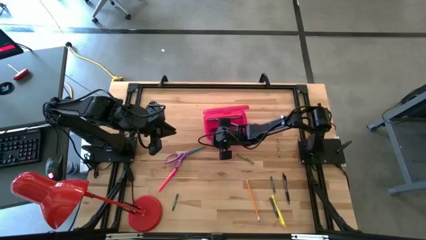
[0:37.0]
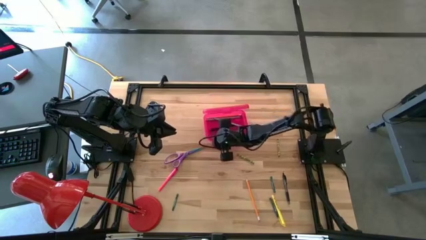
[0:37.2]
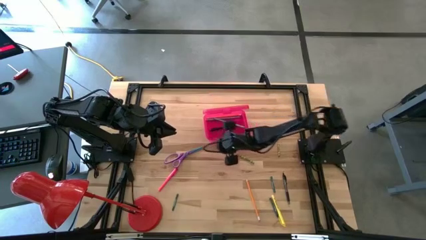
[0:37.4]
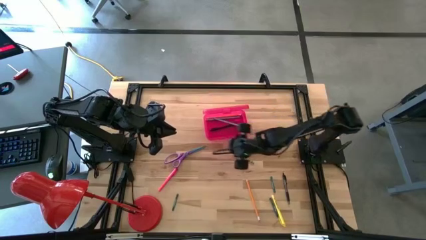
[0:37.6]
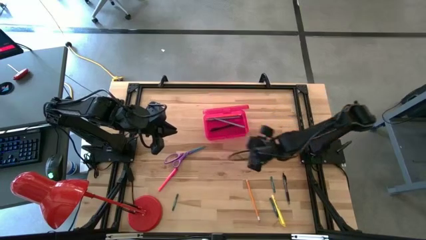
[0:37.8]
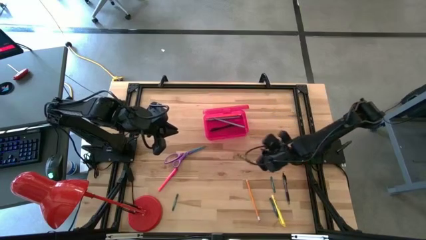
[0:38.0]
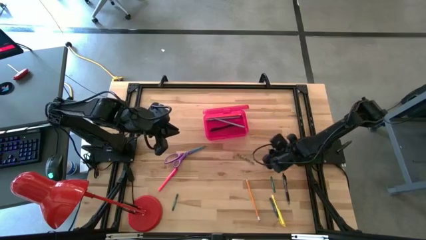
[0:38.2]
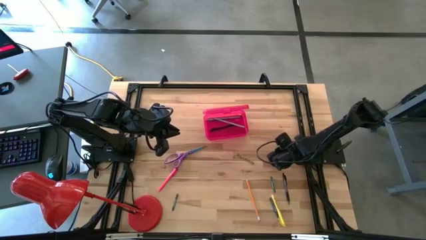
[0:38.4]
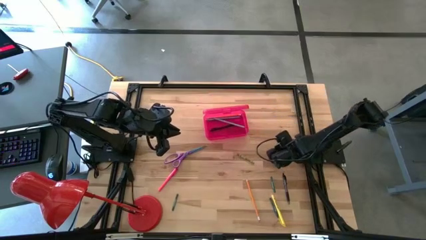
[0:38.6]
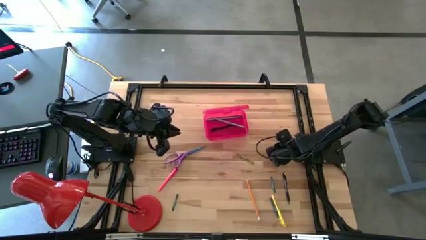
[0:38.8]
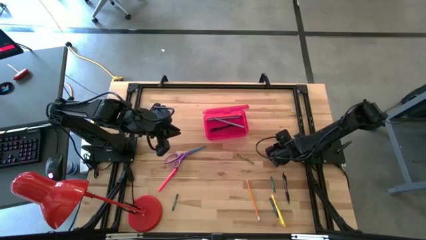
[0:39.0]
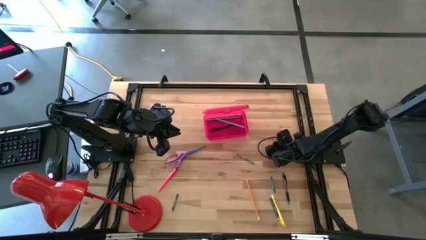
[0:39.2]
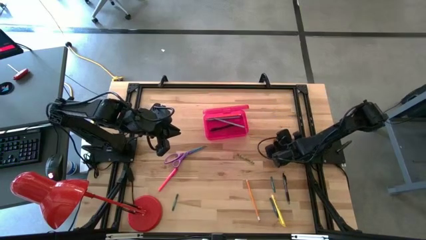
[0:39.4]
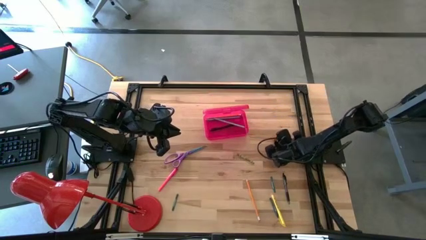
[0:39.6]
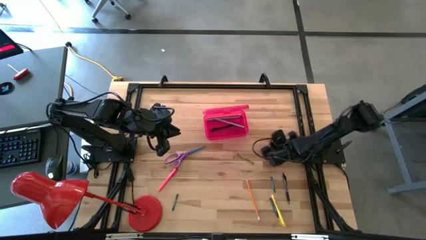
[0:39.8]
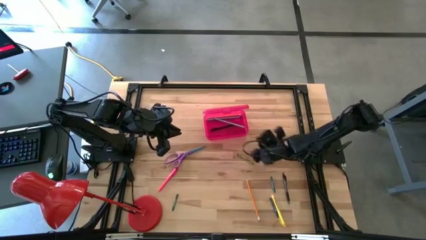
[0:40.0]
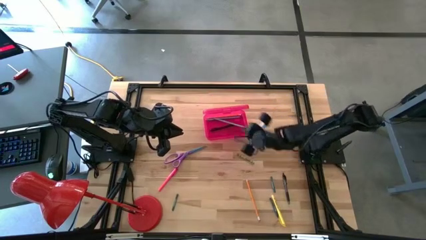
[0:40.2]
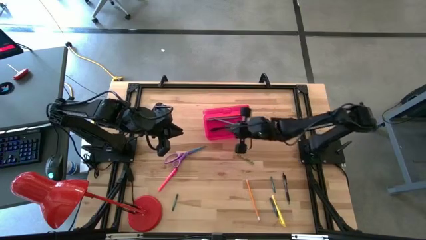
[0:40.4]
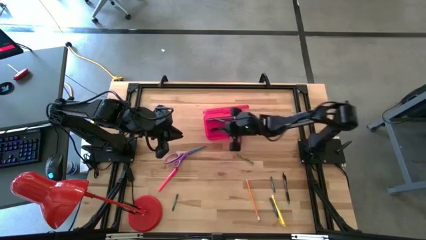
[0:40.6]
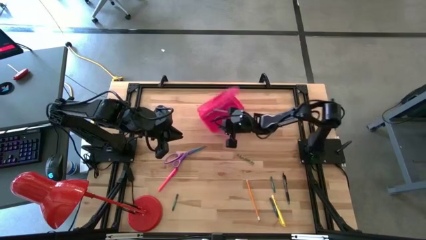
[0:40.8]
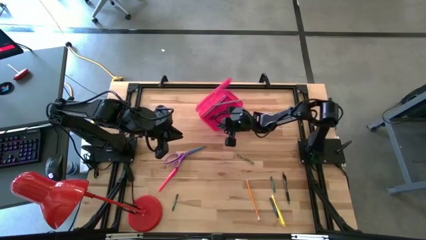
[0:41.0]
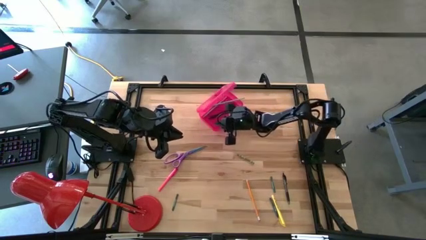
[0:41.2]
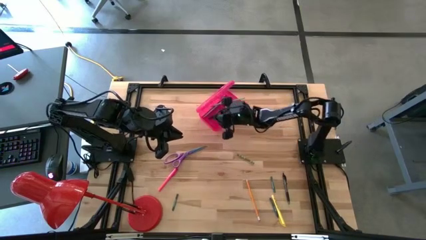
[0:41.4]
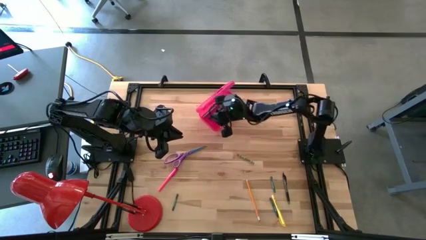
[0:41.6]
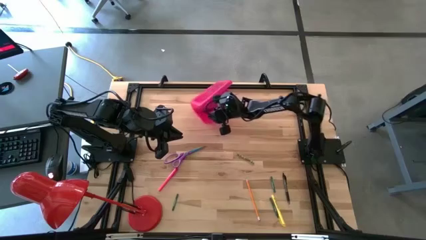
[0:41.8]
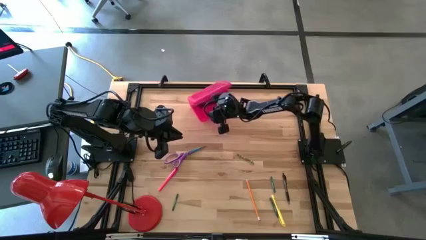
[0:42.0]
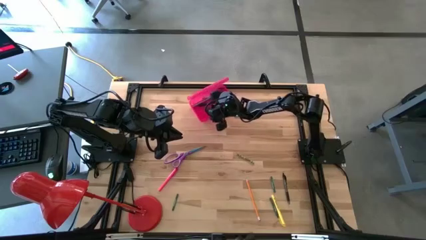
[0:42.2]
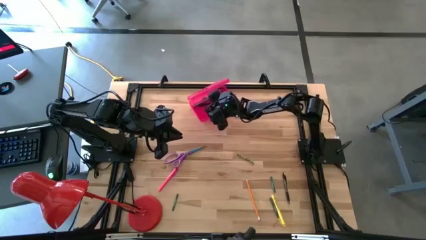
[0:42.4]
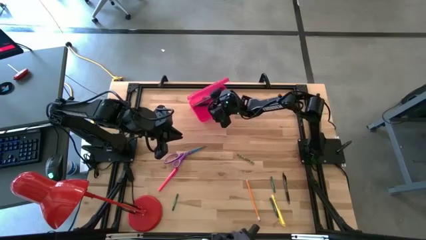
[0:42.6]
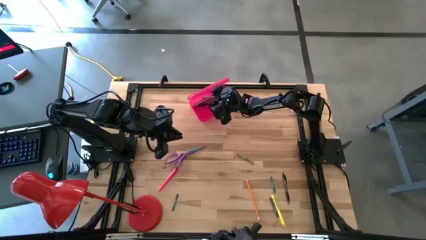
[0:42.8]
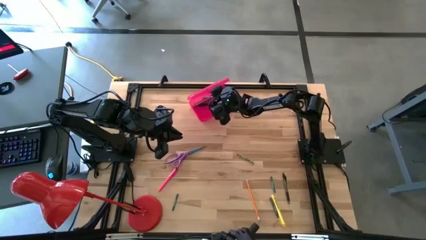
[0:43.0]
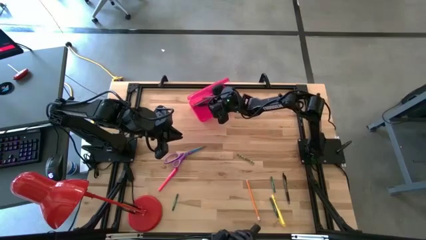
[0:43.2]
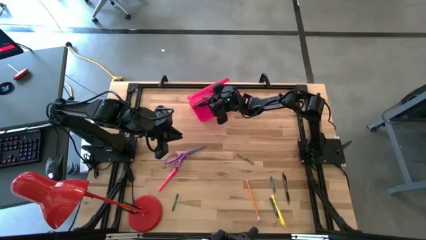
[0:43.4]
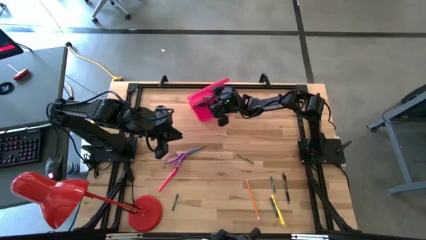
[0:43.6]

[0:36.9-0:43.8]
Task: Pick & place school supplies into a supply box
Put the right light green crayon into the pink supply box

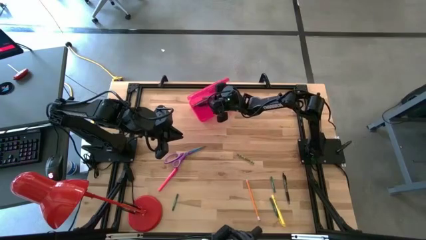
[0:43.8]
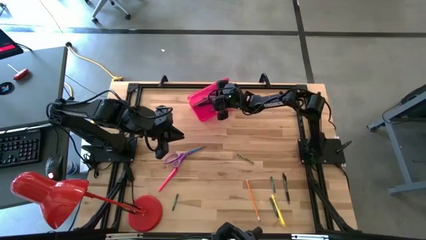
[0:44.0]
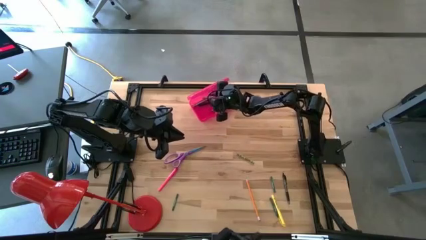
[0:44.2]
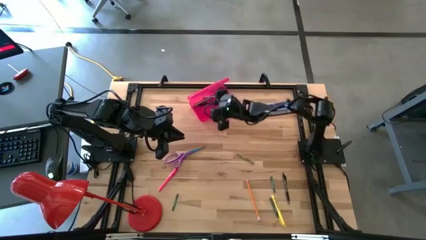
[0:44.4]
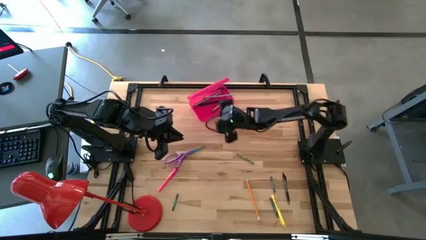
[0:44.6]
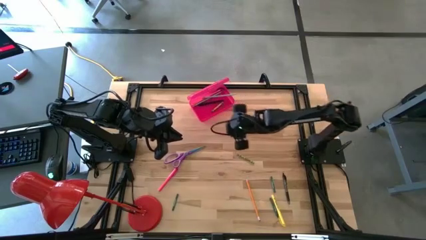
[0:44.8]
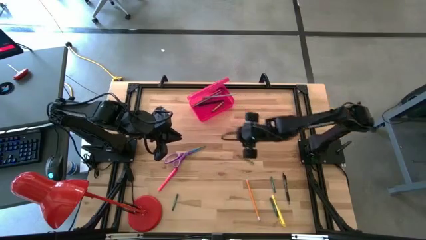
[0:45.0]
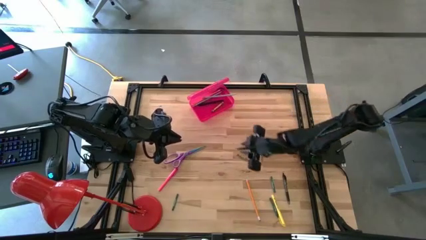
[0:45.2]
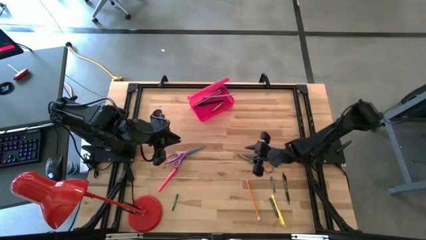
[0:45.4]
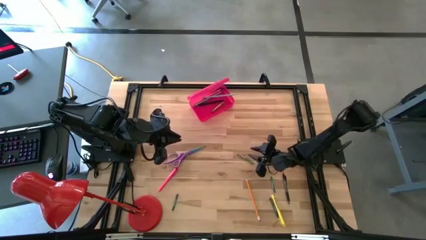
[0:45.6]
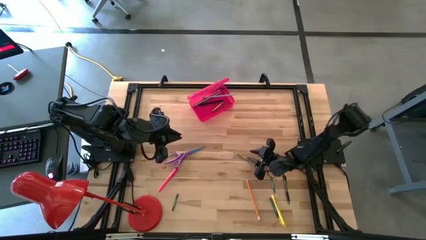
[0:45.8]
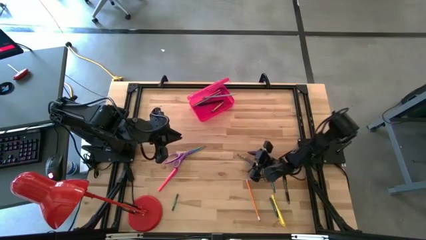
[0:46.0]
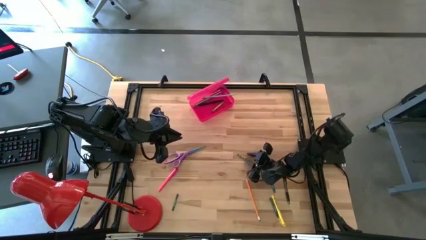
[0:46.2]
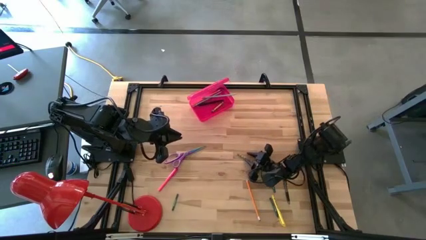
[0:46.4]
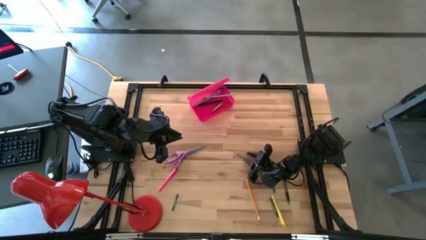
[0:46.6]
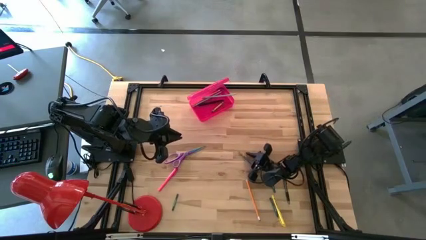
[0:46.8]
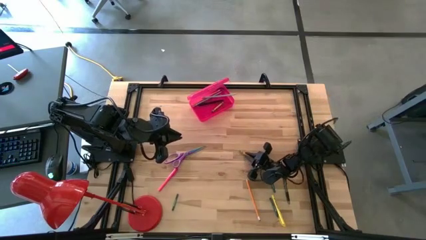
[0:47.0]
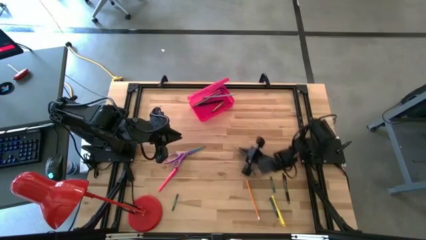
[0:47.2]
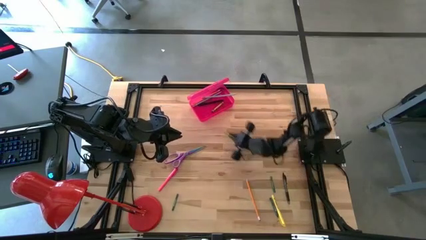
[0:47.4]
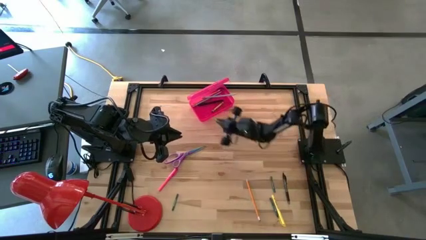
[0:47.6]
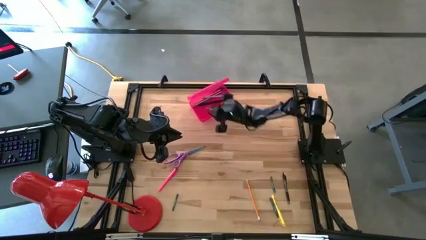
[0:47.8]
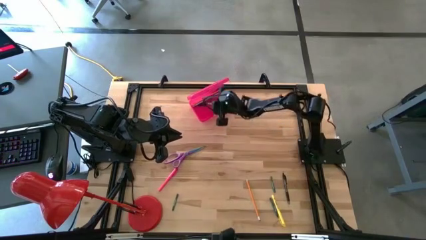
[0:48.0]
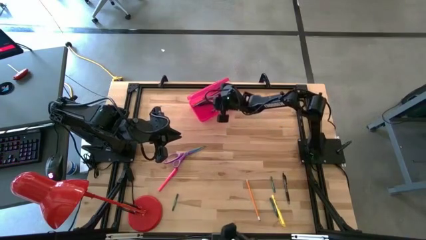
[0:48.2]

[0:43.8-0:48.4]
Put the light green crayon into the pink supply box

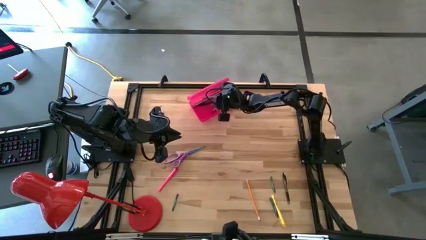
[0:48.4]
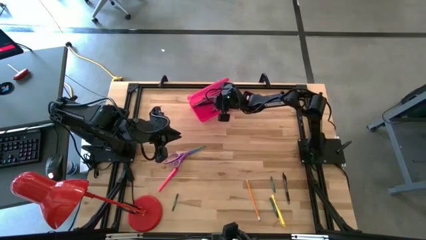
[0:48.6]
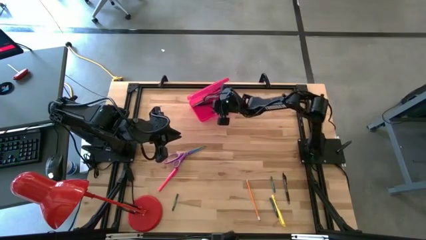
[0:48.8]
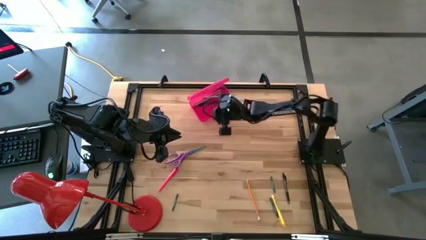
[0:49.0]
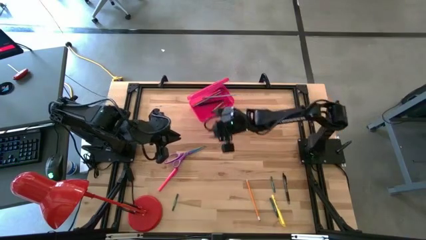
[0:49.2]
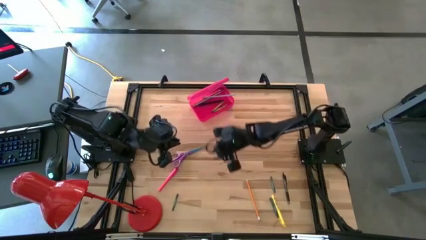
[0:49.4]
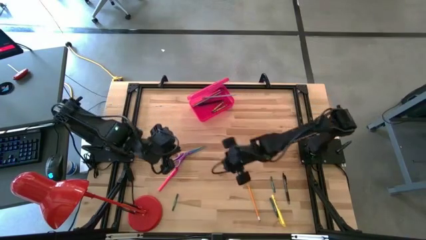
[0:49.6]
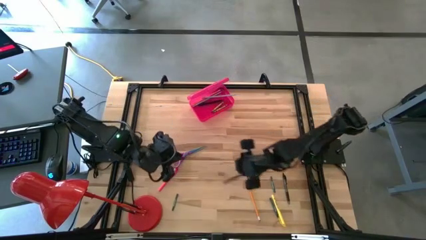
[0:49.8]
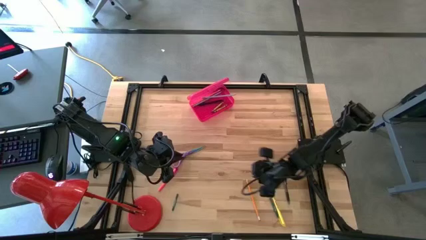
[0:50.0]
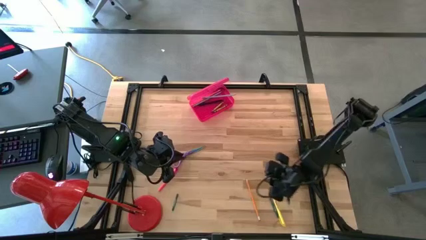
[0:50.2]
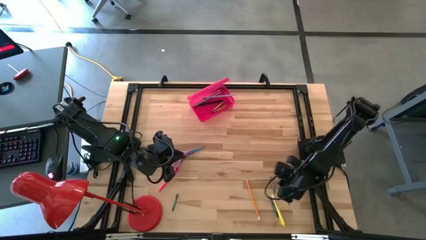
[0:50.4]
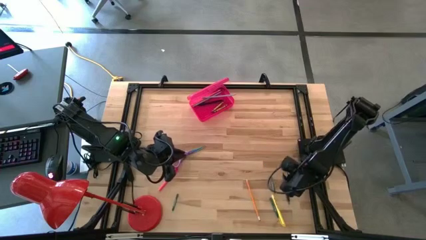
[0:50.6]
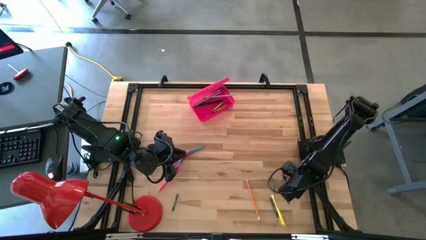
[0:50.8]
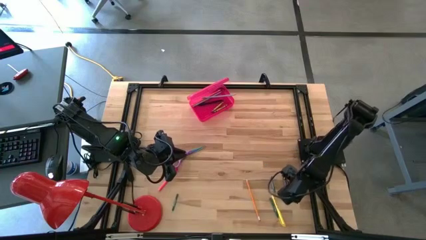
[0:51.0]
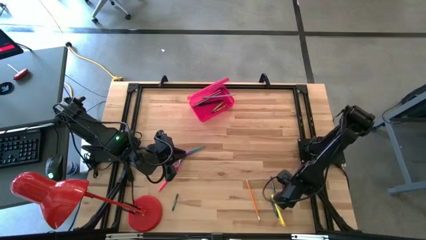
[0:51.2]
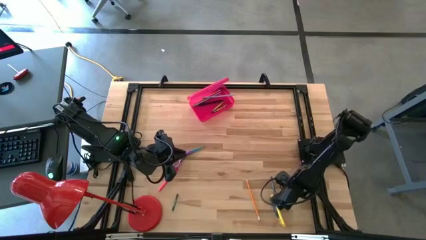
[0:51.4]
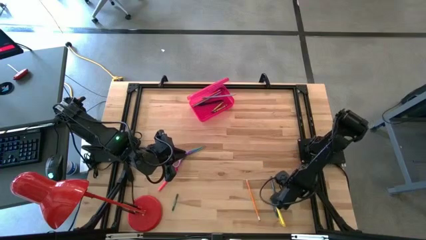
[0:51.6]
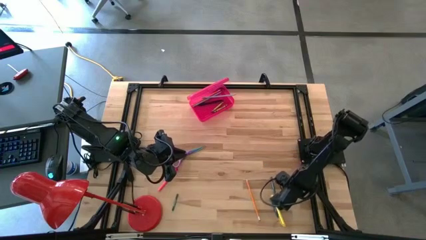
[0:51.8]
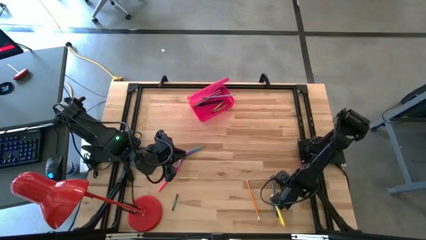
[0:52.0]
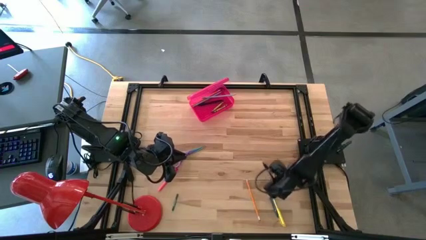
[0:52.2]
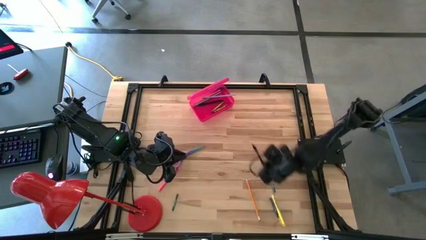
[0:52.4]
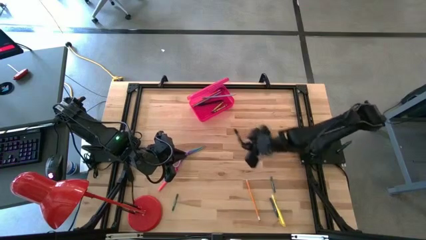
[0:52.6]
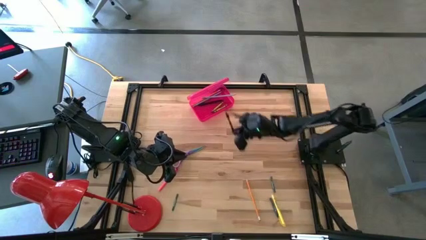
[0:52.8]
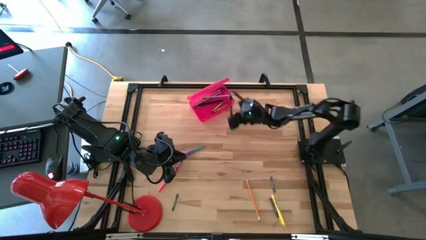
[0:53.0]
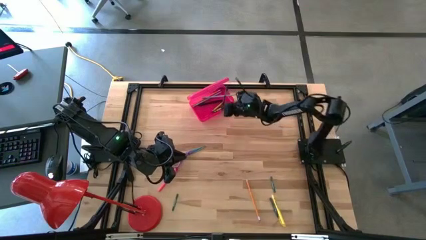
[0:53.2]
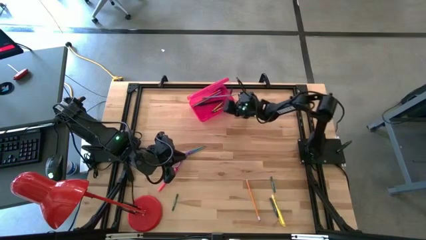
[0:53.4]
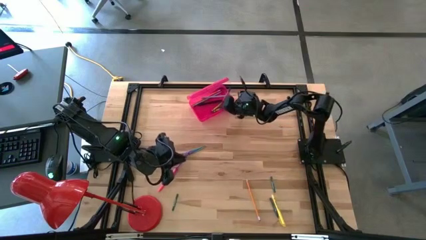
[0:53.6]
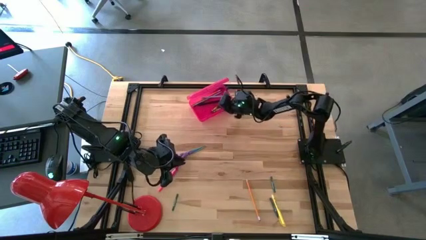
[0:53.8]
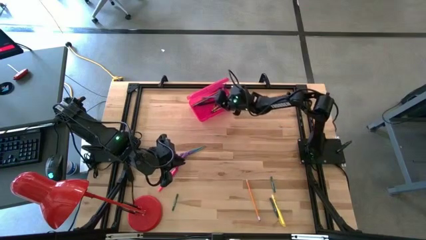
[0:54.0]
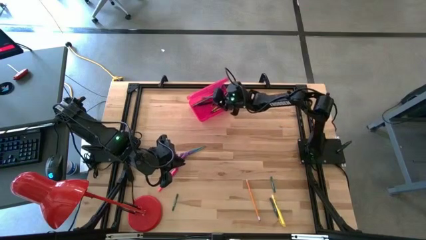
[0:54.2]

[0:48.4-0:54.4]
Put the black transparent pen into the pink supply box
